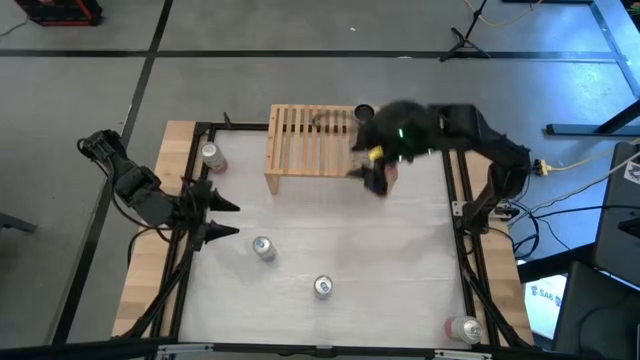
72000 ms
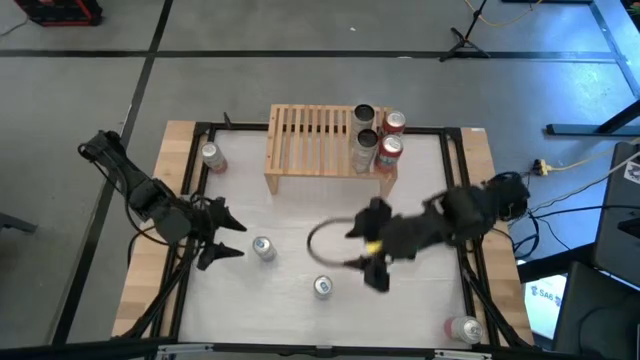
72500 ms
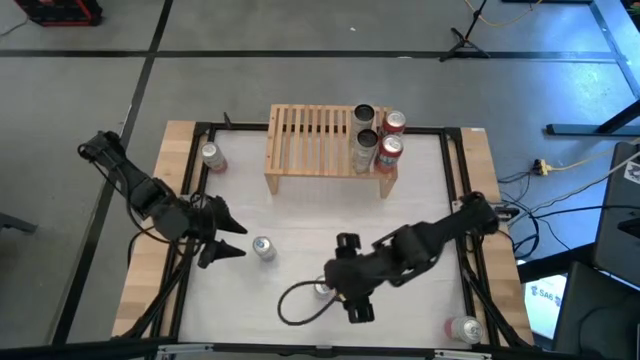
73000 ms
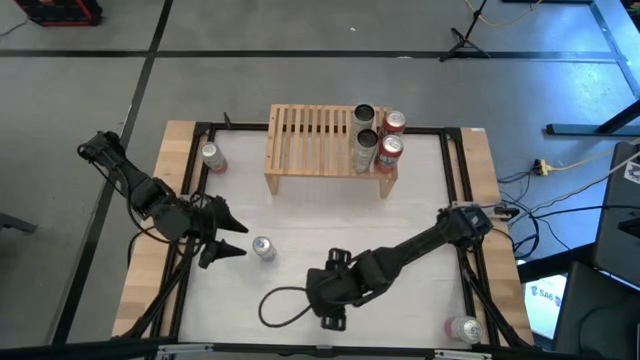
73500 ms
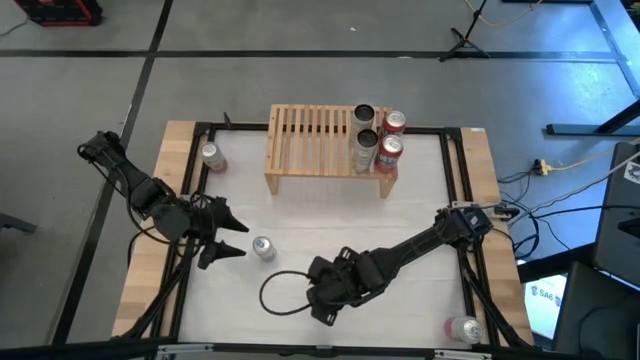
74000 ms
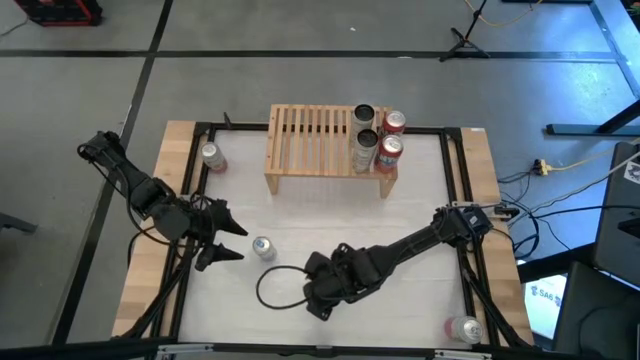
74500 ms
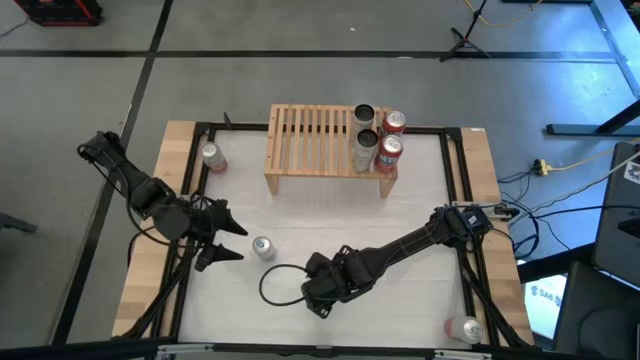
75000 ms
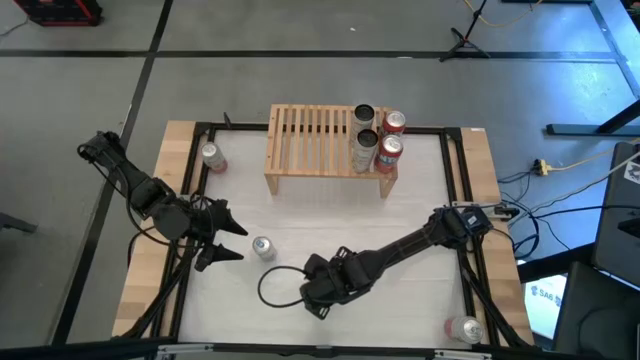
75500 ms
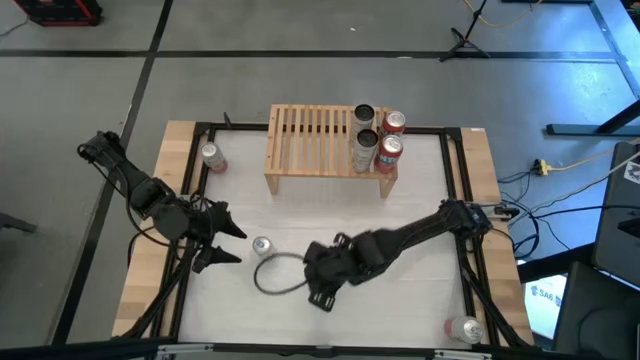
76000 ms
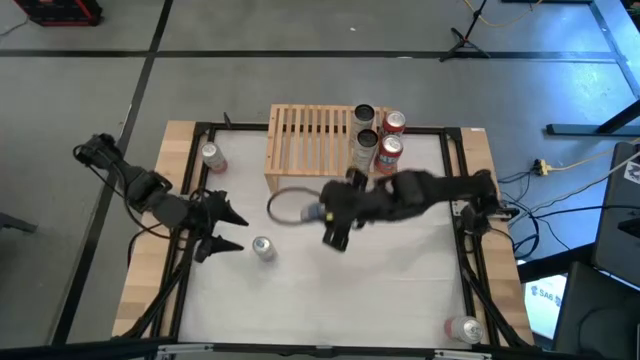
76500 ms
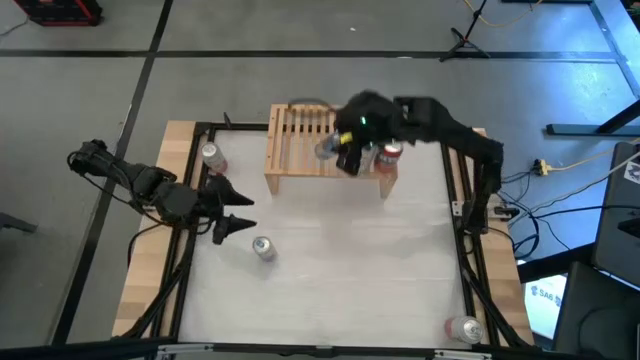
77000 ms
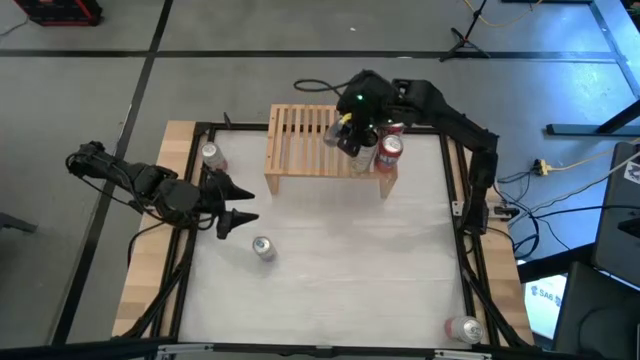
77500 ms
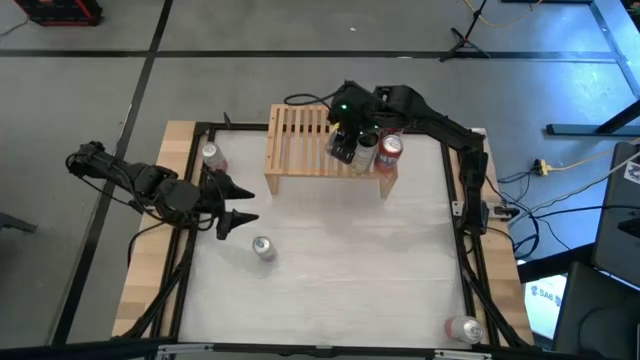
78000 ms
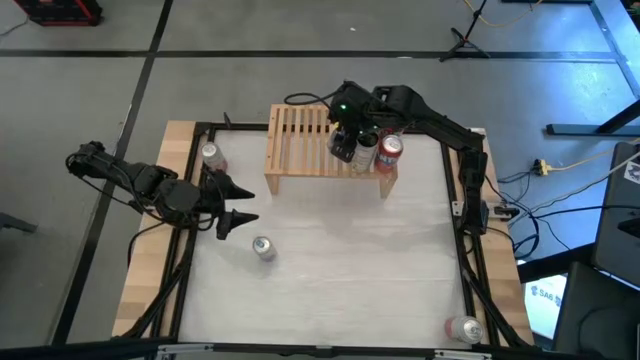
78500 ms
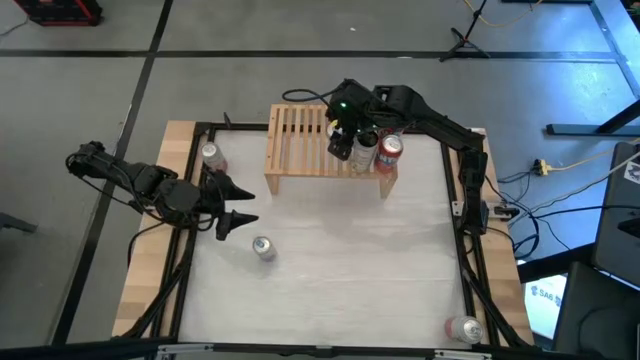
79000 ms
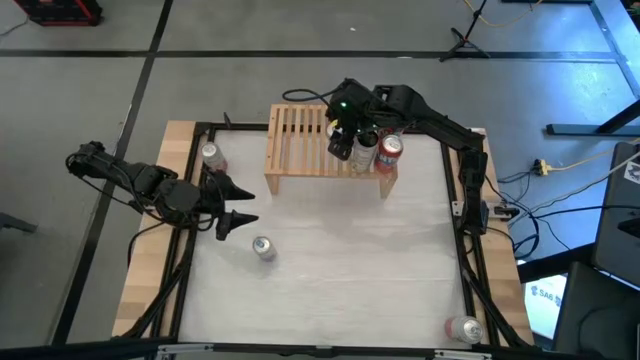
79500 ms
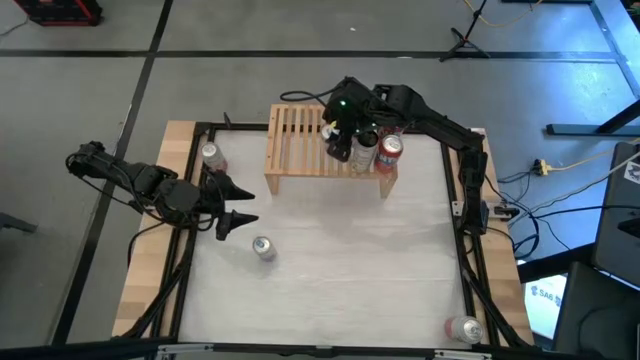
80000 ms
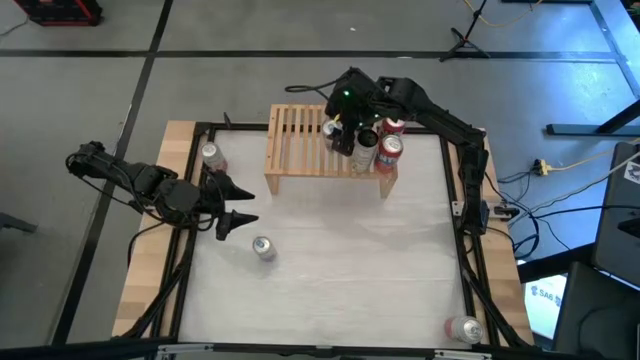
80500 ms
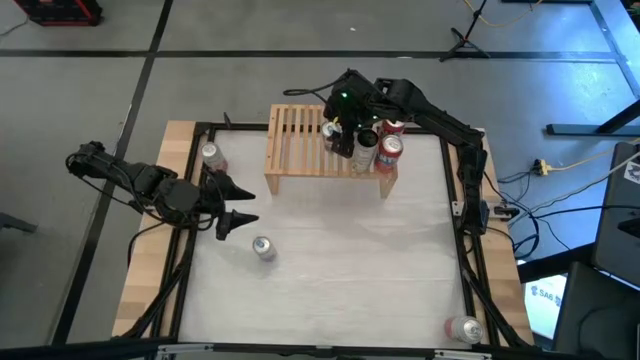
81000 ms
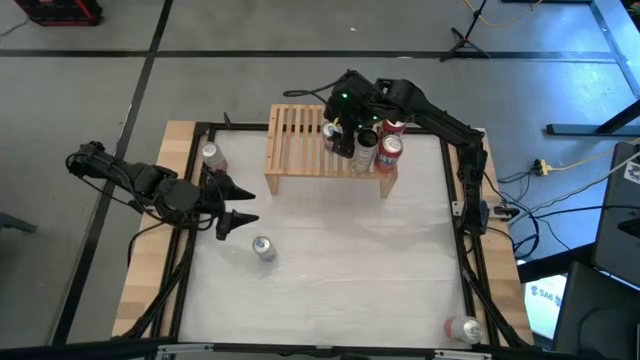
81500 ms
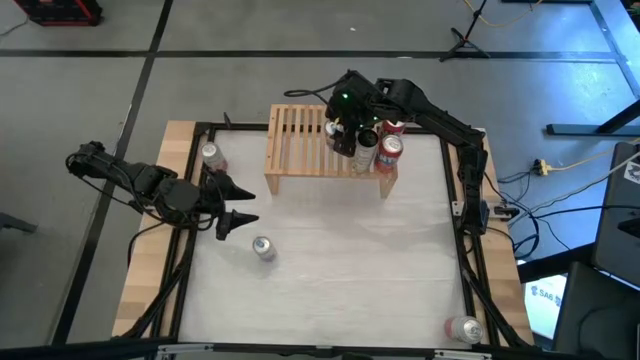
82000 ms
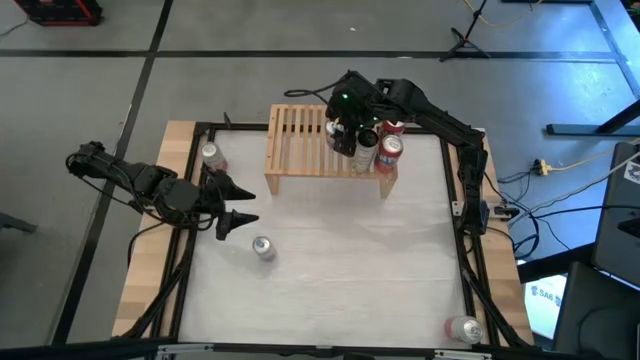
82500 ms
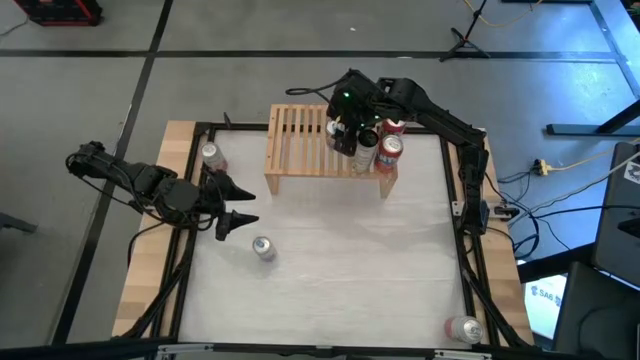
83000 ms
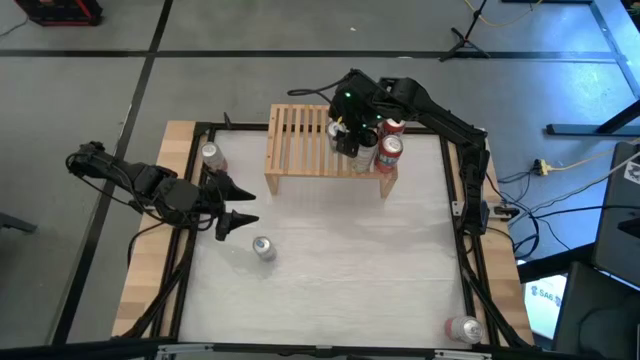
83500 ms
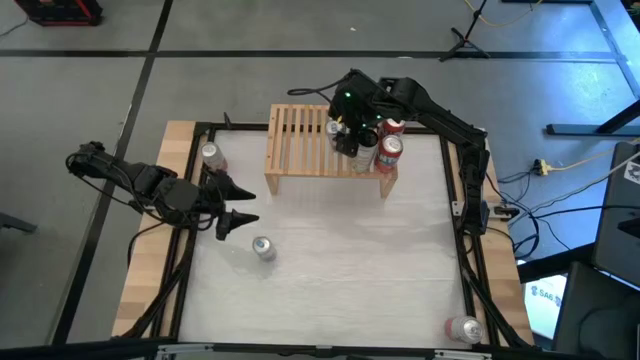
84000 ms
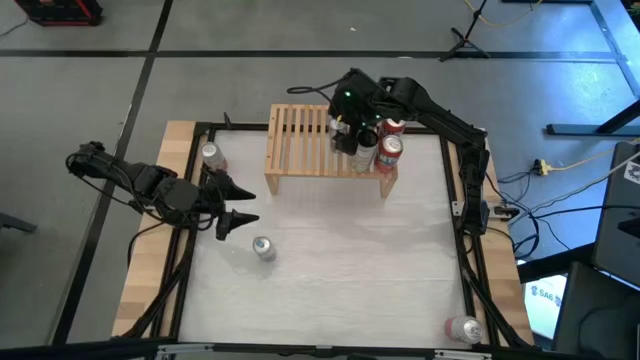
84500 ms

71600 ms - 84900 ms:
Task: Place canned beverage on shelf
Put the bottom blue soda can on the shelf

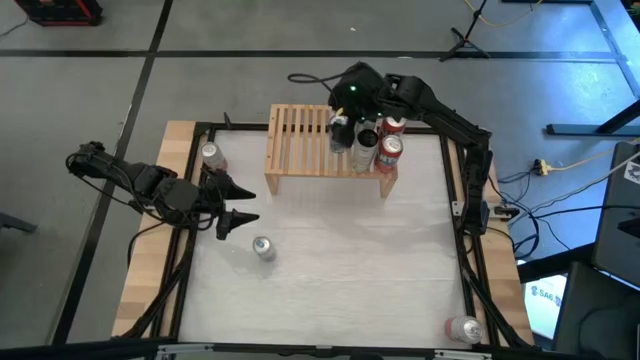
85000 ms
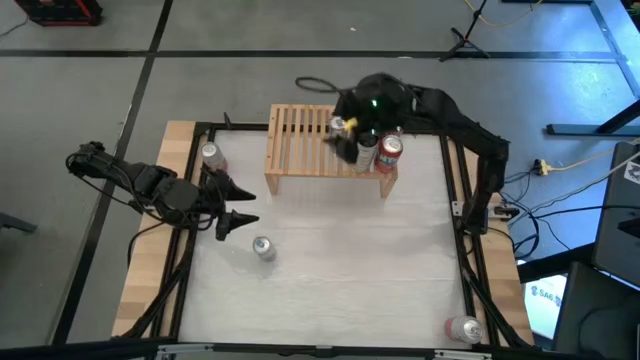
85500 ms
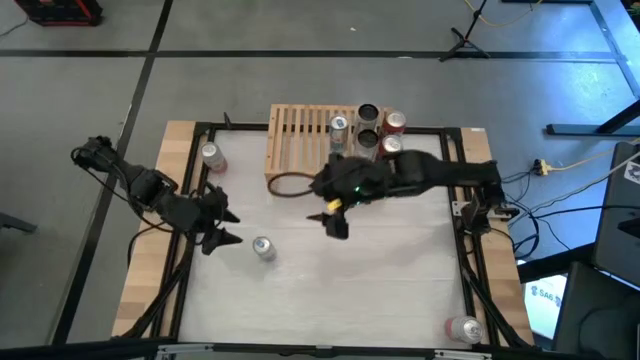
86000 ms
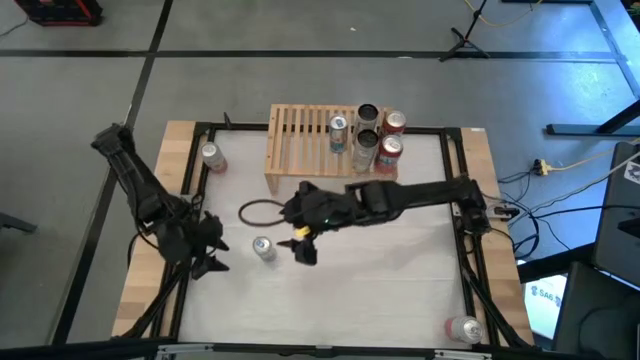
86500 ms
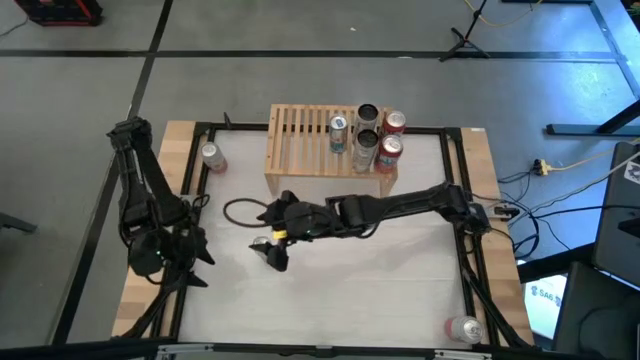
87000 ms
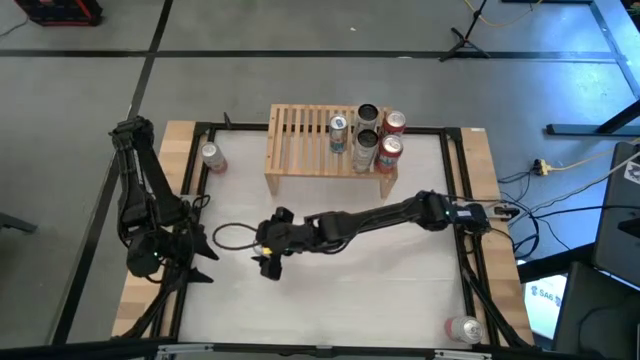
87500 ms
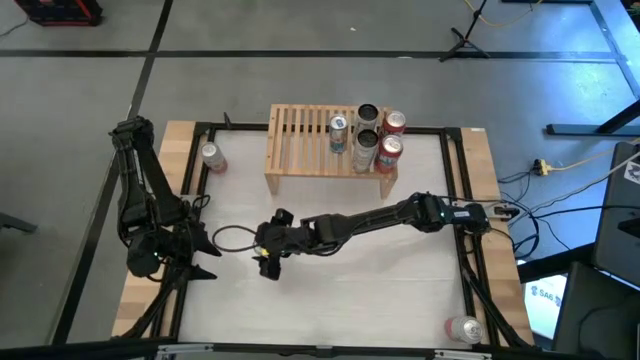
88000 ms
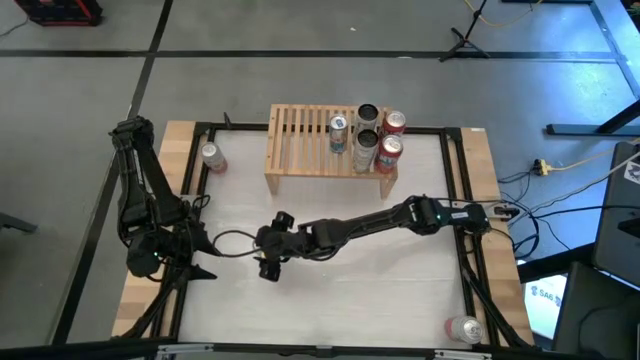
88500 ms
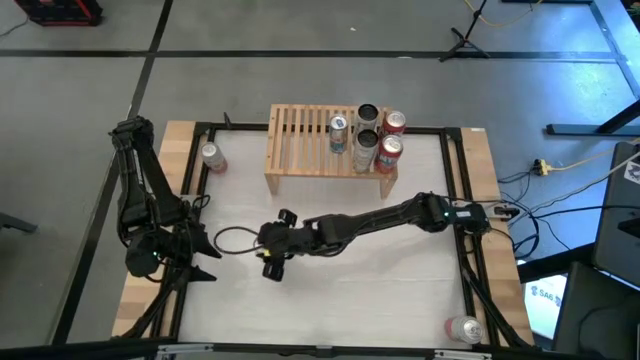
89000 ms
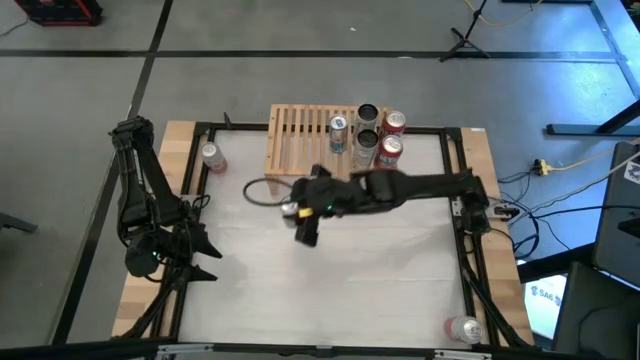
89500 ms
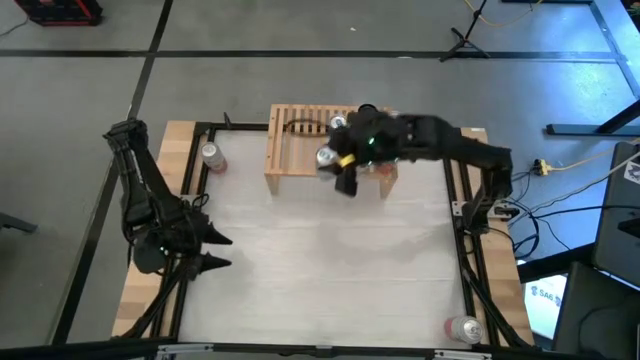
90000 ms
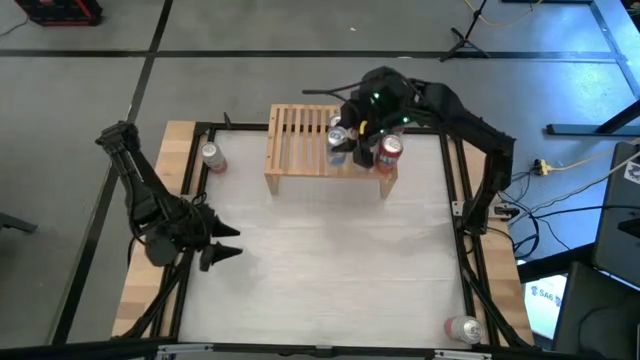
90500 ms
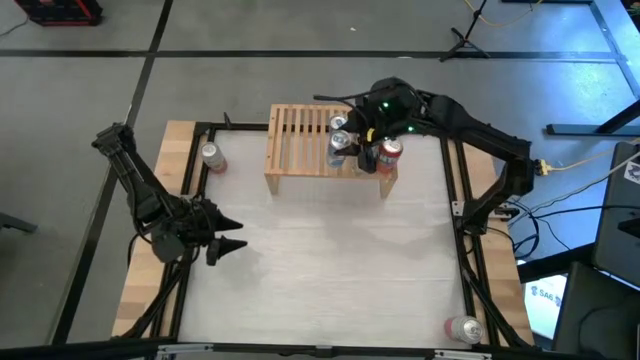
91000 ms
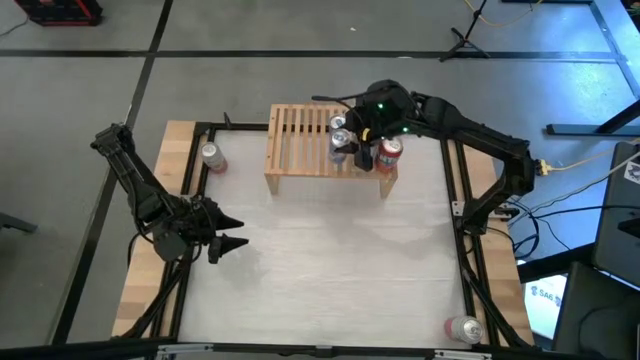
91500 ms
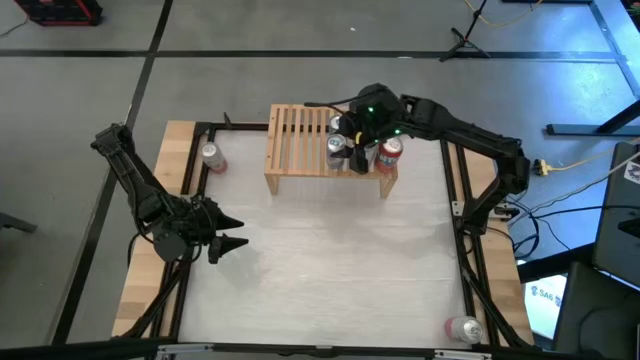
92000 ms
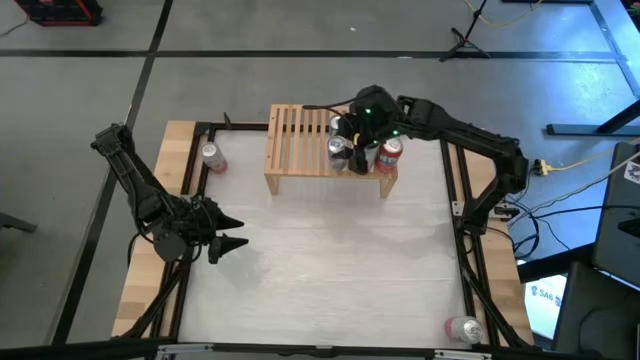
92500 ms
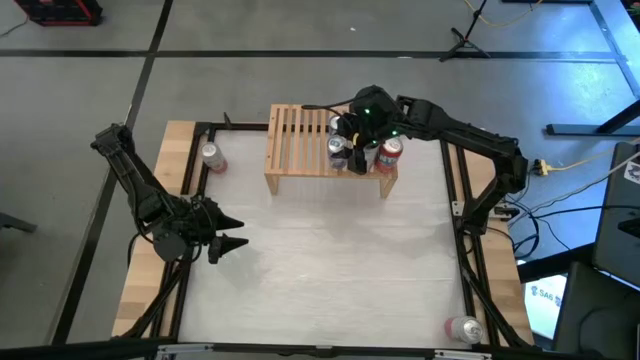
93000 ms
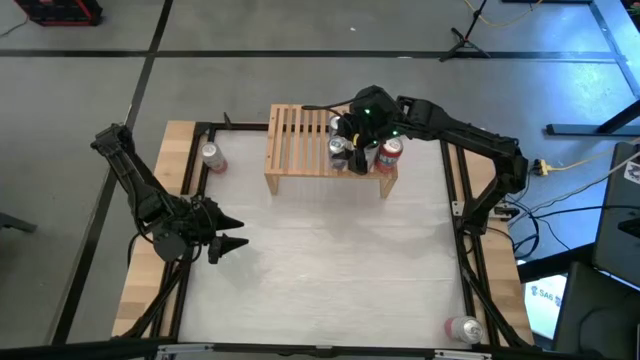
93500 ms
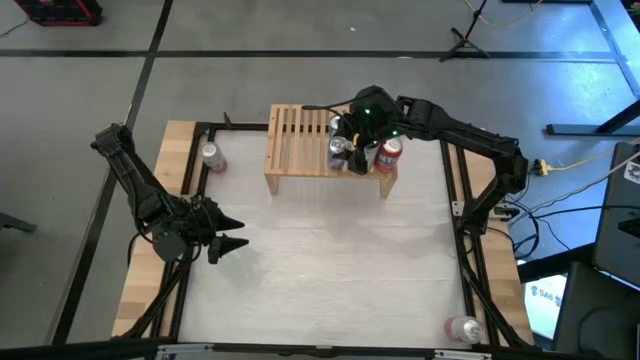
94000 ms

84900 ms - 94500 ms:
Put the blue soda can aligned with the other blue soda can on the shelf
